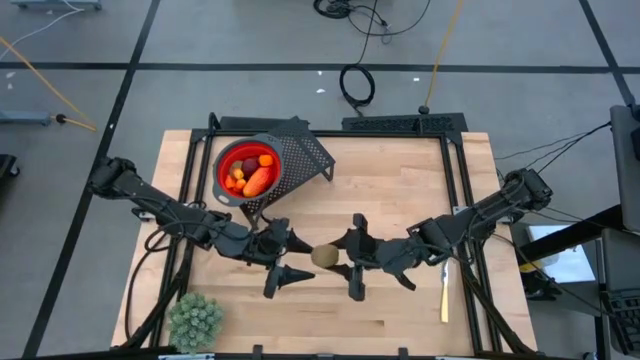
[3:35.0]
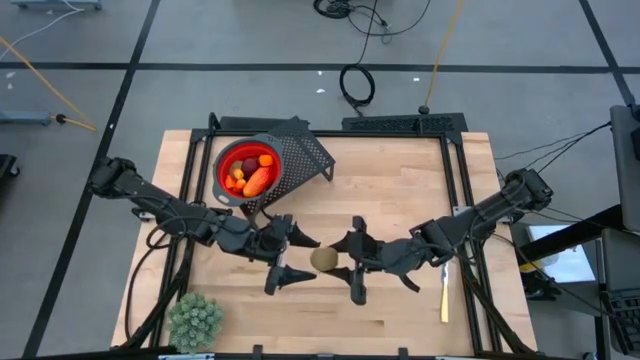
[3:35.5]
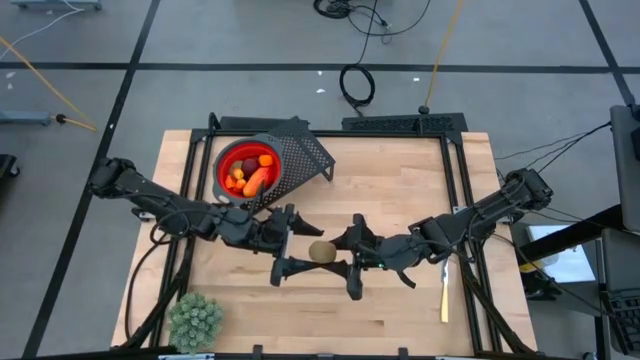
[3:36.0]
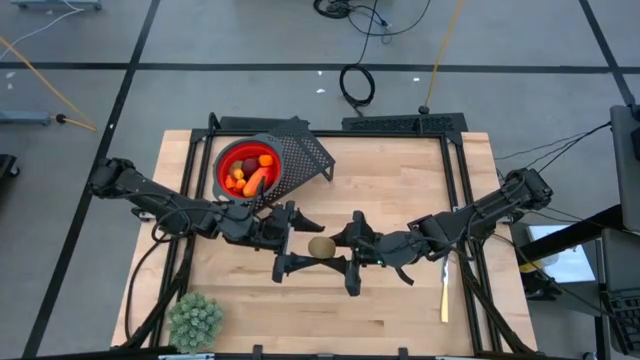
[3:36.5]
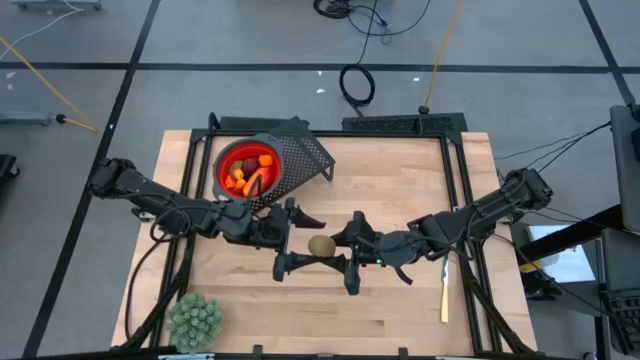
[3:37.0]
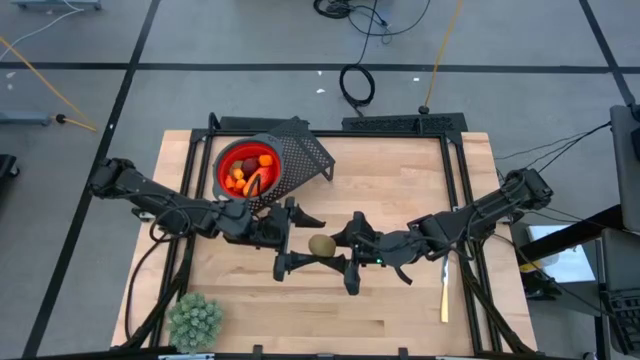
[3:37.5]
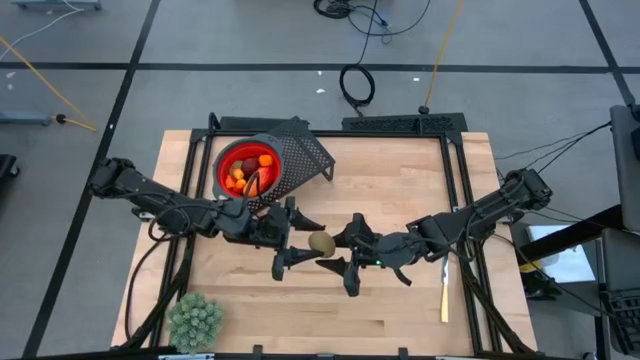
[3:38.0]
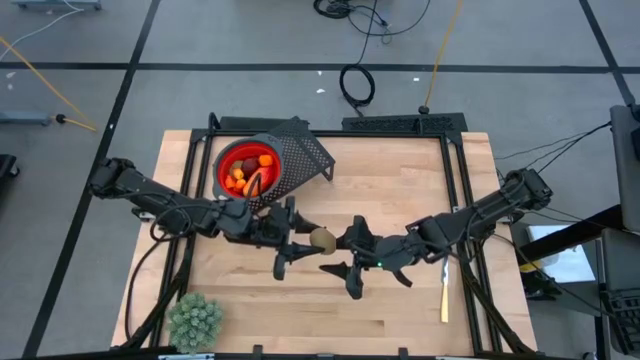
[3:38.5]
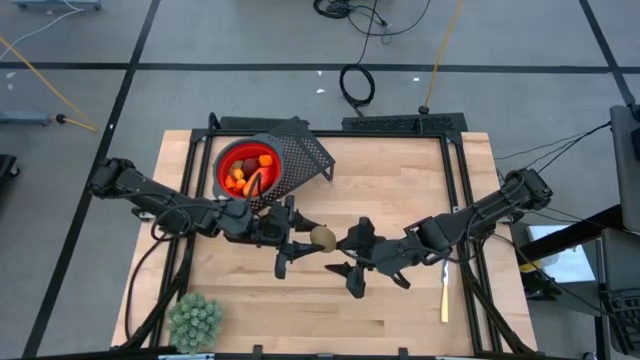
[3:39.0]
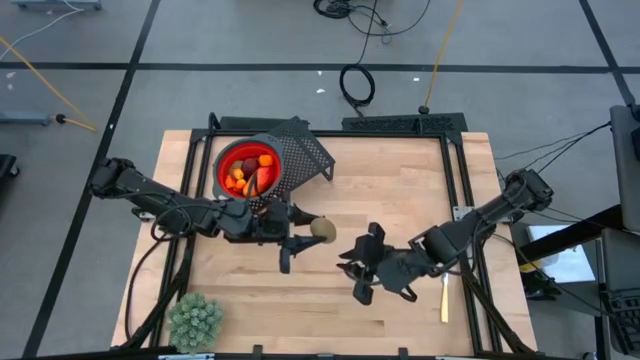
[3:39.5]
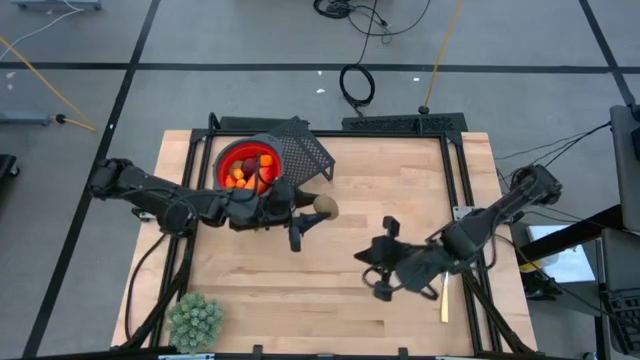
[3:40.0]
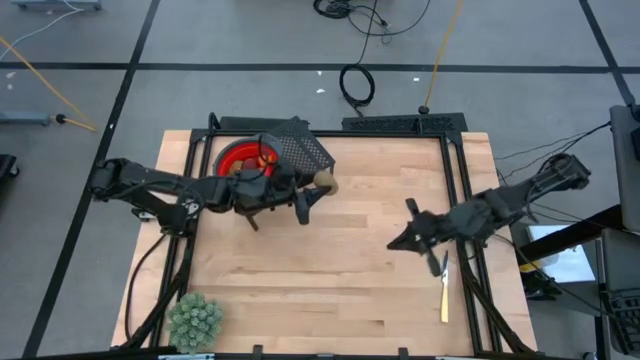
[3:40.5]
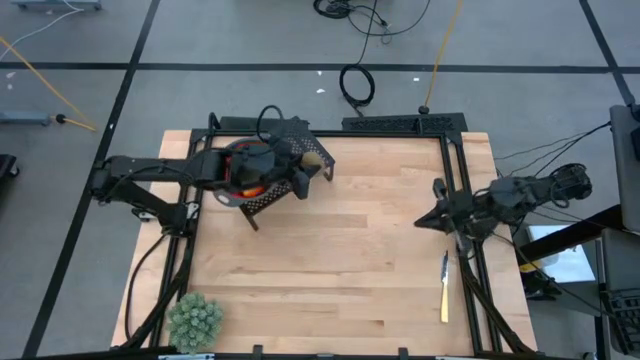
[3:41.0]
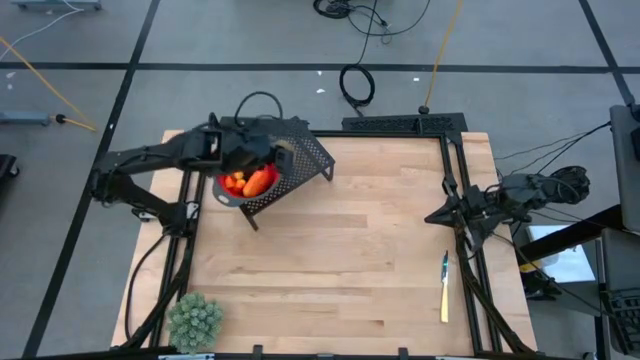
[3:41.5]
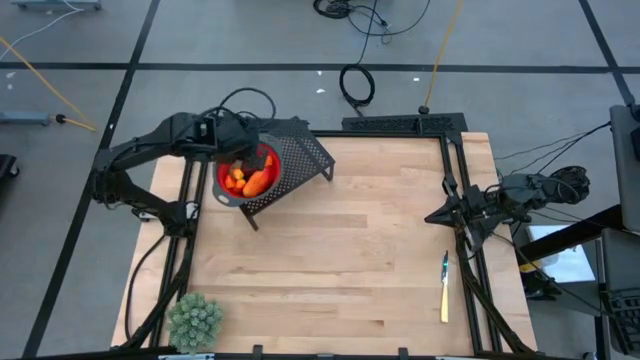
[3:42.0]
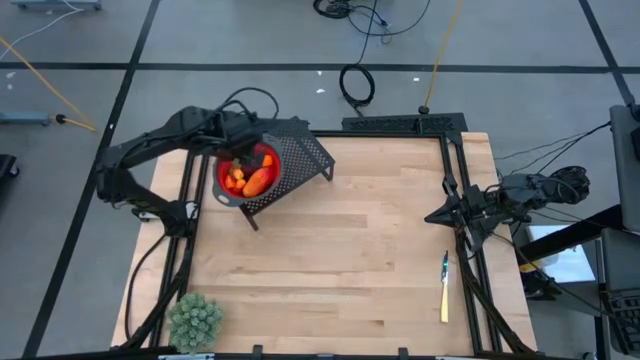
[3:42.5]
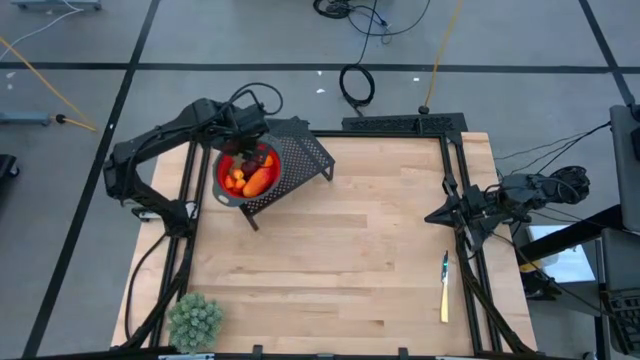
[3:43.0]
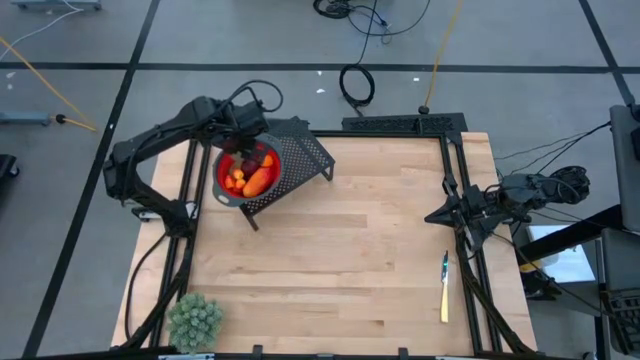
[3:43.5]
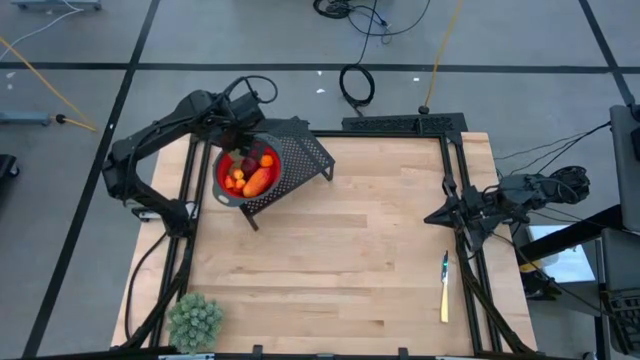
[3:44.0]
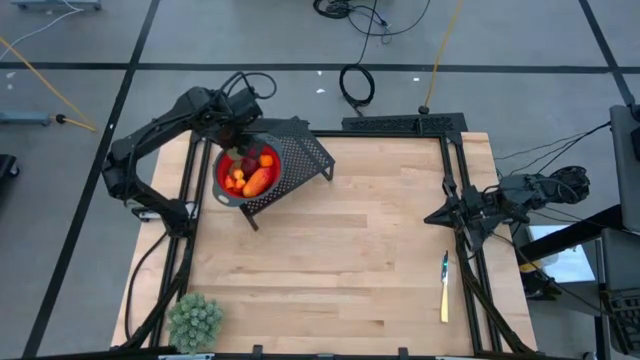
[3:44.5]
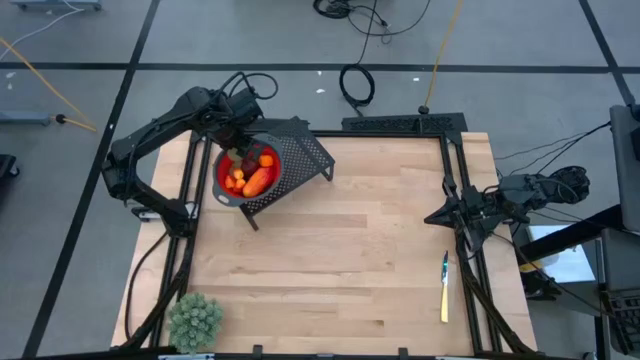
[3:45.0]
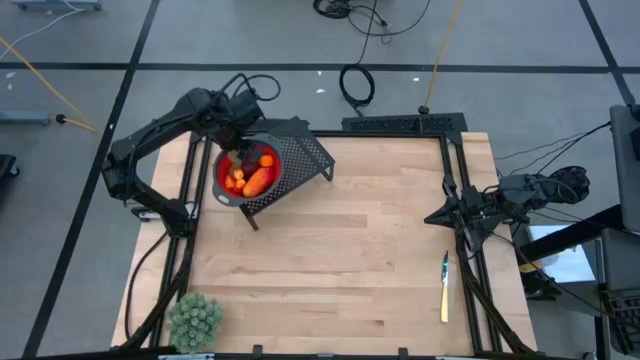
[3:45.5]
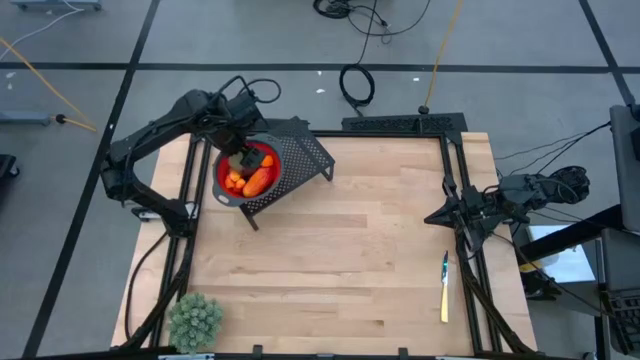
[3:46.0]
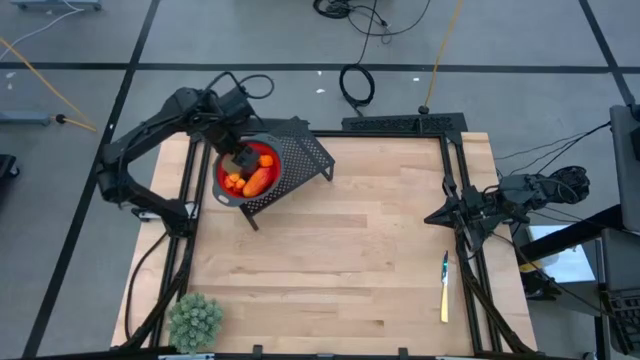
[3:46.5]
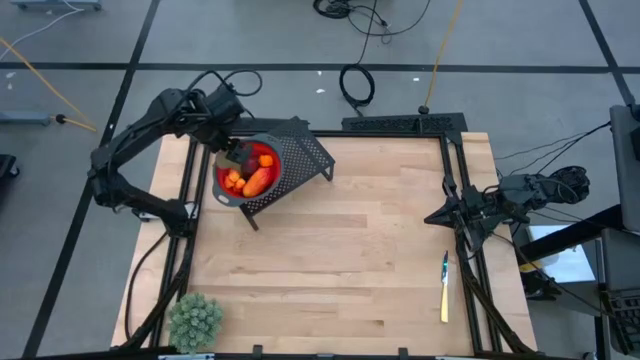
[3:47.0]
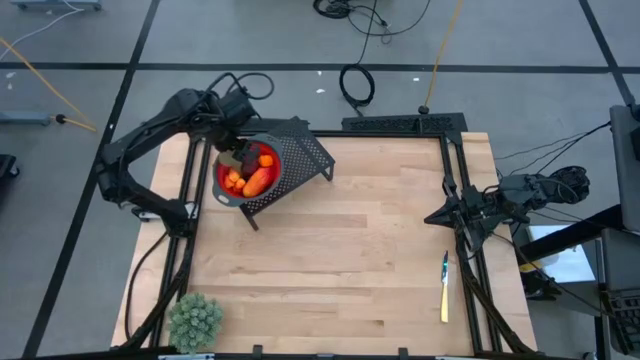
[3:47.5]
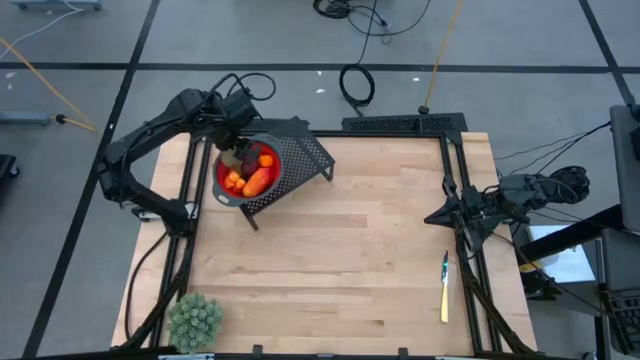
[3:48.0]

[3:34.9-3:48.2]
Task: Pick & Place Fruit
Put the kiwi into the red strainer bowl on the shelf

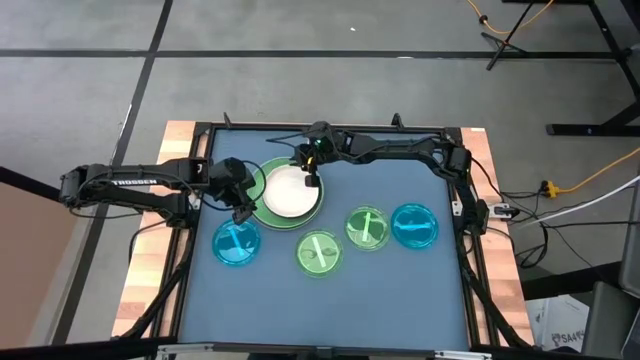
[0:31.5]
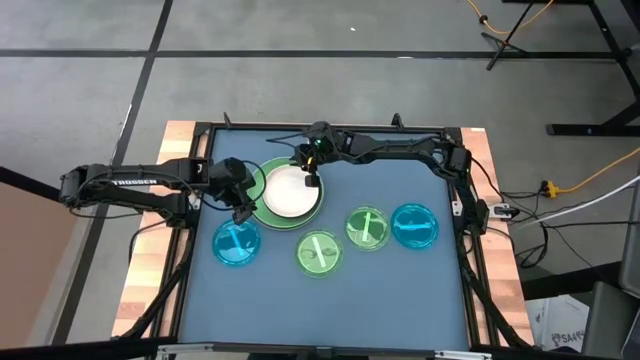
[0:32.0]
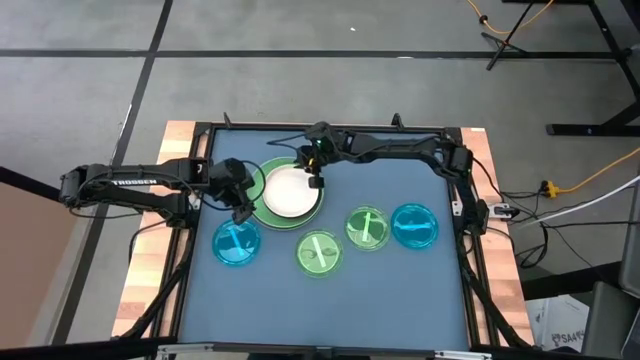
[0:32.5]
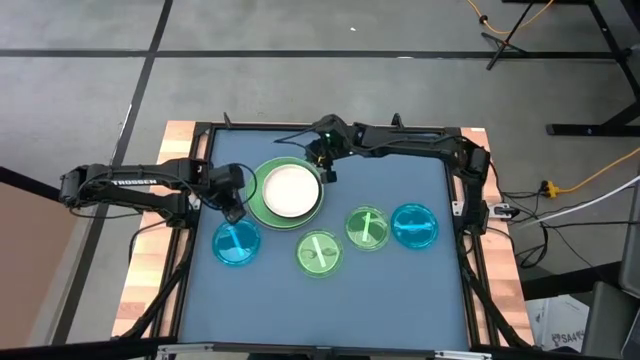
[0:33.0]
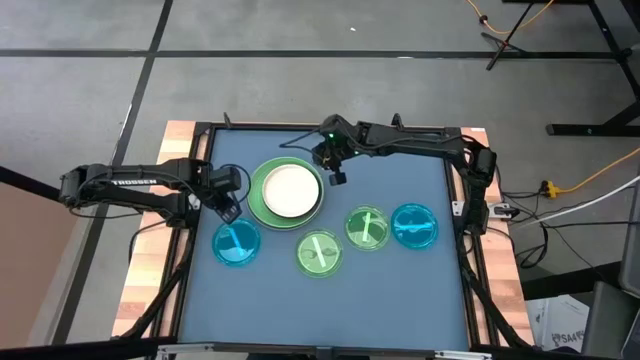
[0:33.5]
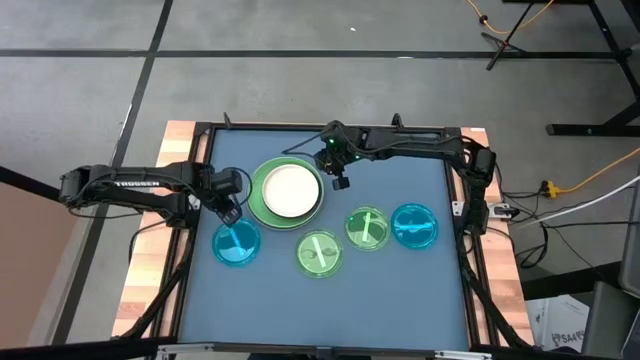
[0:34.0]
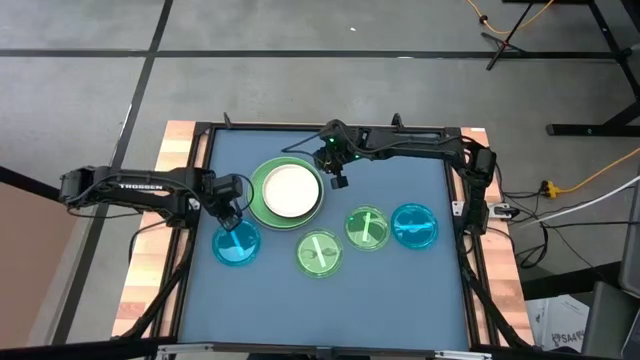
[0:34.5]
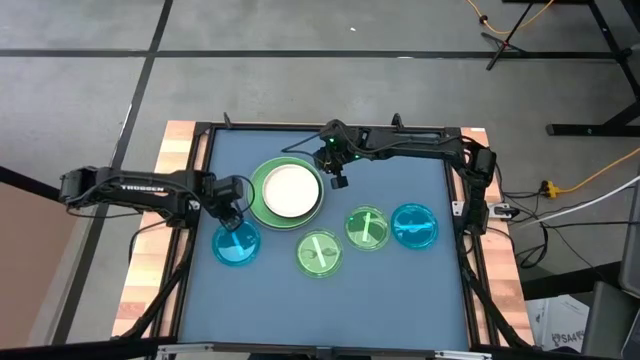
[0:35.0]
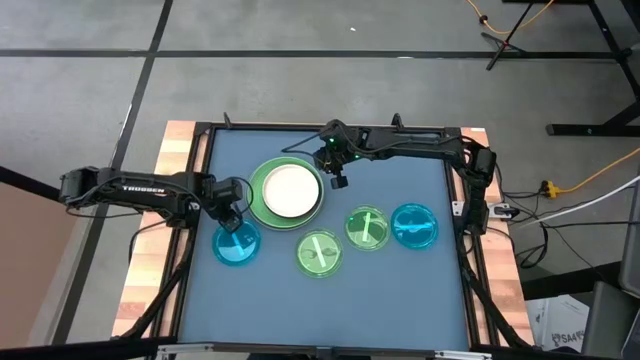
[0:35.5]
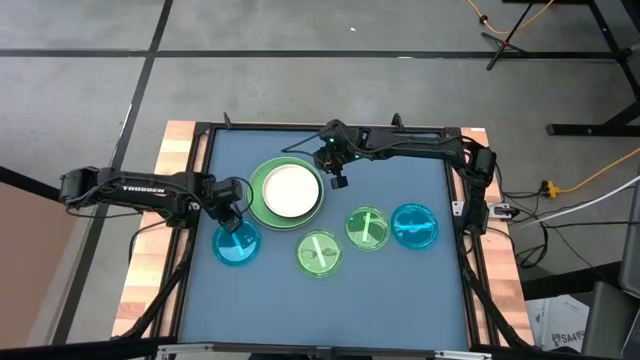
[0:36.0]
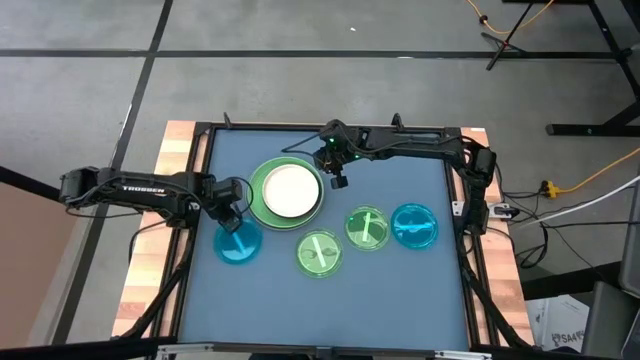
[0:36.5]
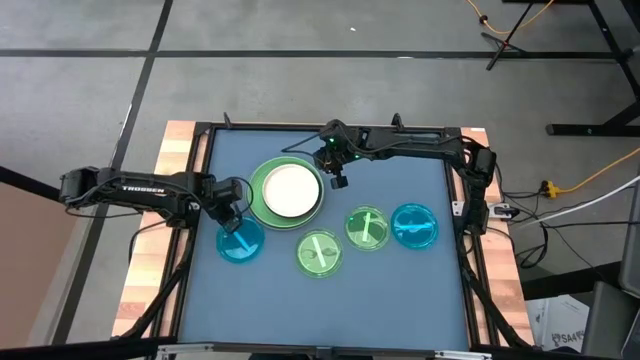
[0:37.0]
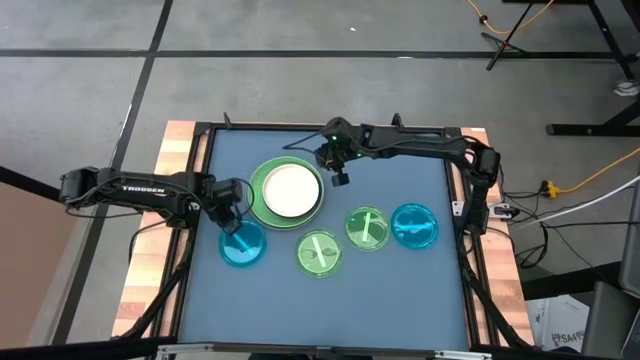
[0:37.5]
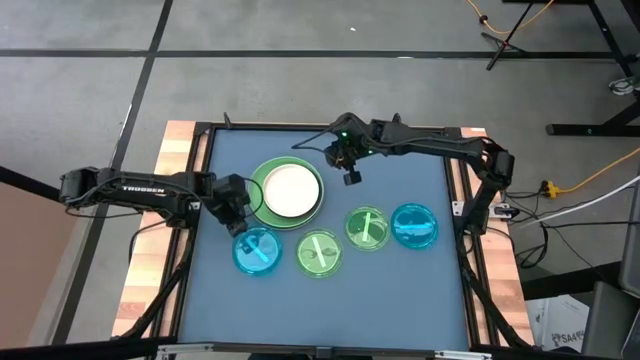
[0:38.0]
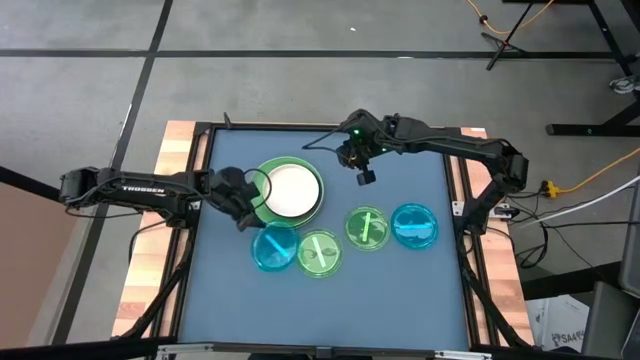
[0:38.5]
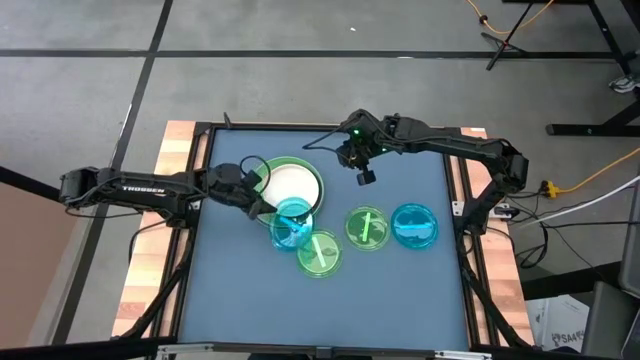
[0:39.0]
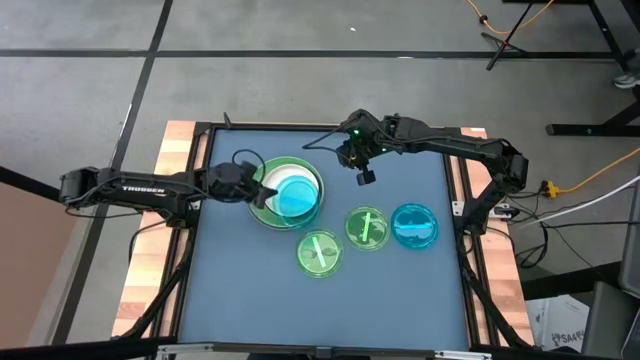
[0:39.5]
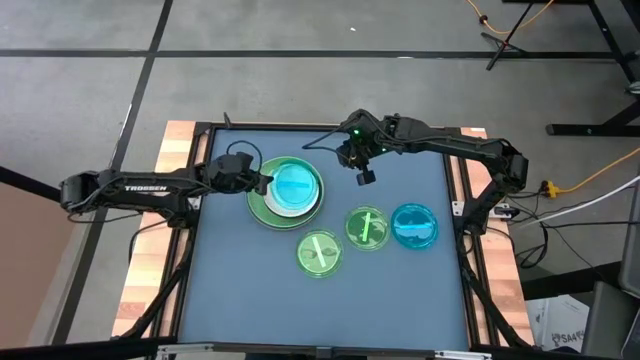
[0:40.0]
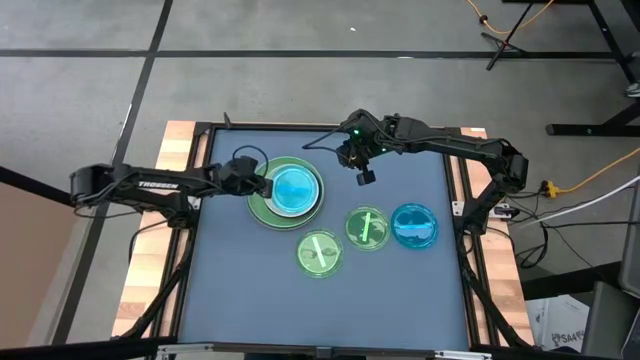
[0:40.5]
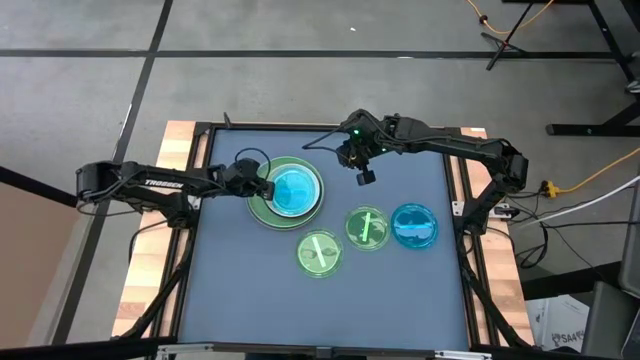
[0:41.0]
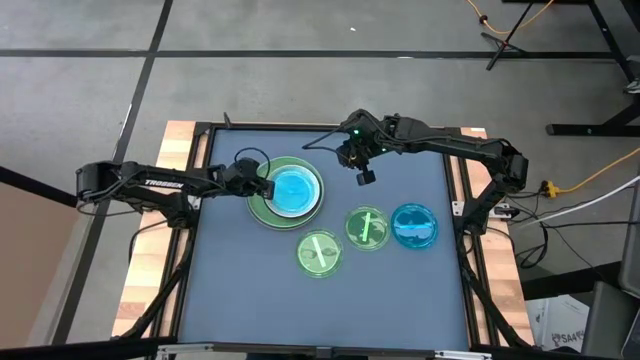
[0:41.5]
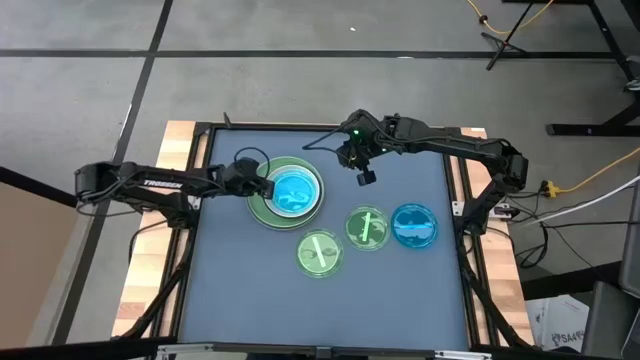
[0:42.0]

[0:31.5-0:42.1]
Task: Stack plastic plates
Stack the left transparent blue plate on top of the white plate
